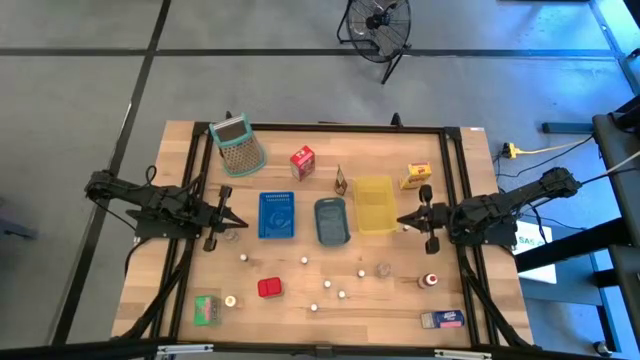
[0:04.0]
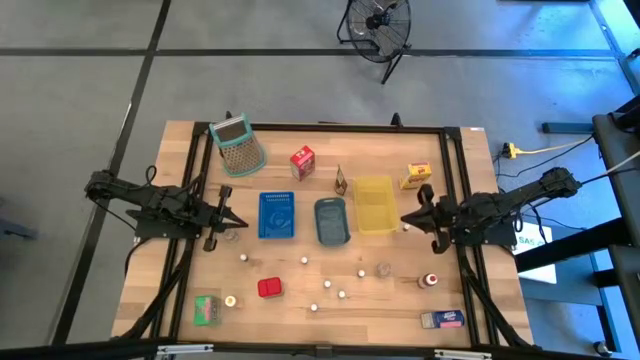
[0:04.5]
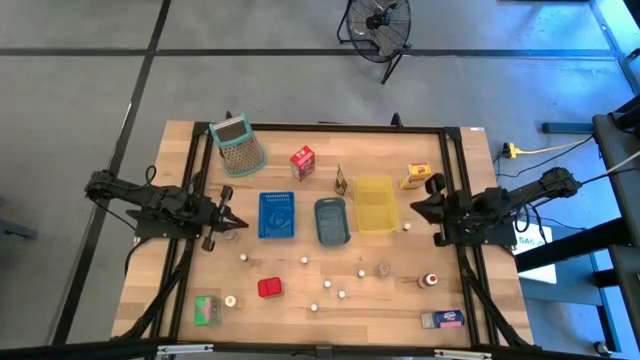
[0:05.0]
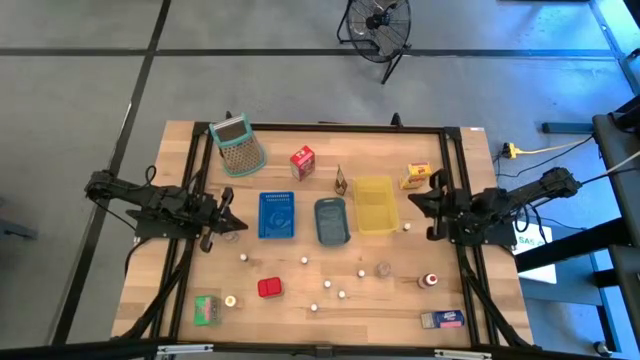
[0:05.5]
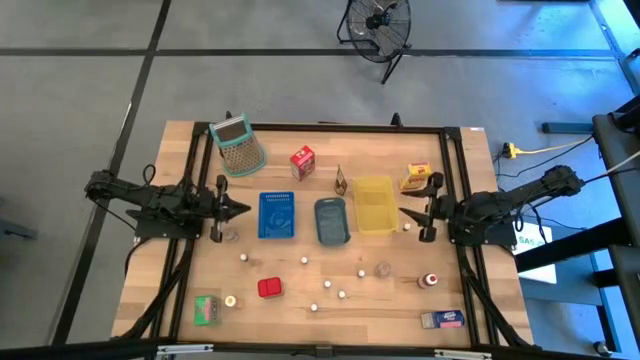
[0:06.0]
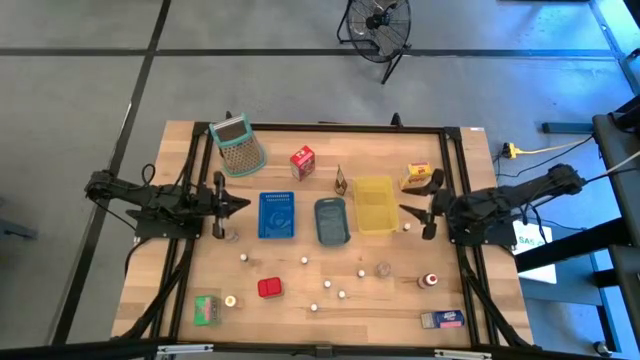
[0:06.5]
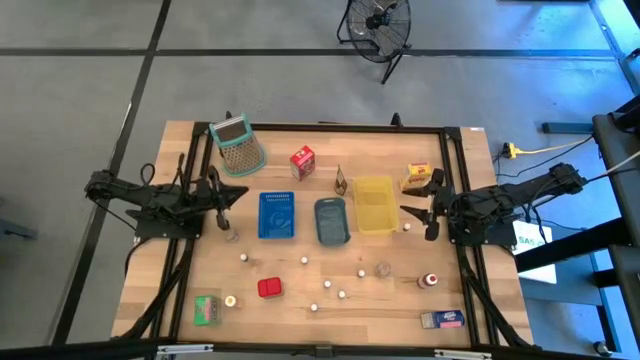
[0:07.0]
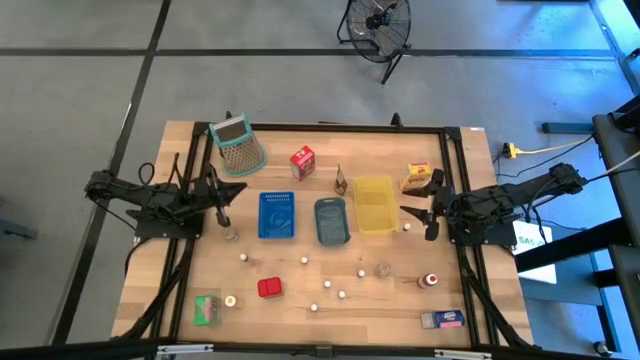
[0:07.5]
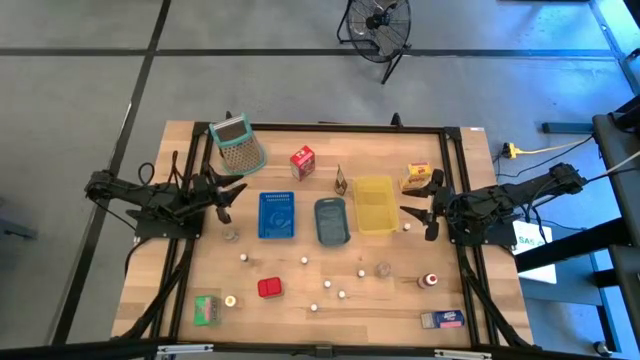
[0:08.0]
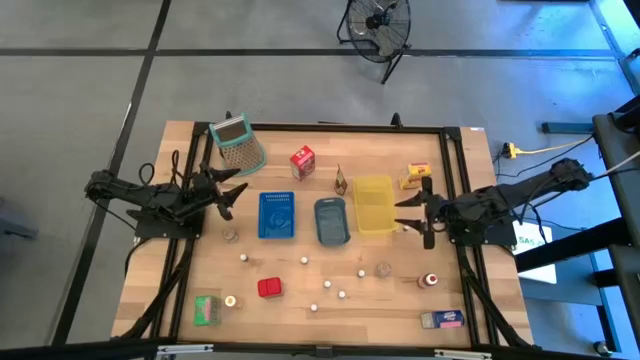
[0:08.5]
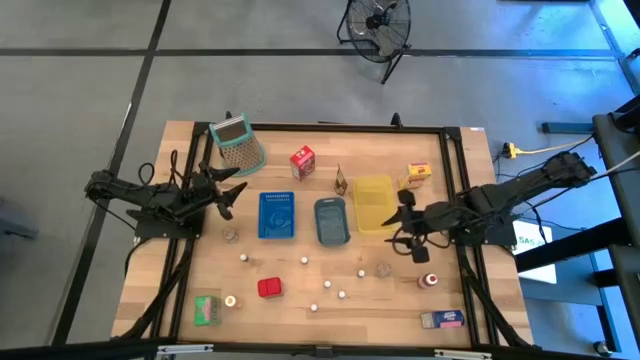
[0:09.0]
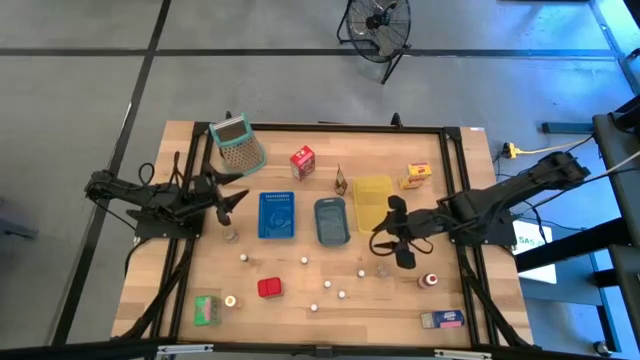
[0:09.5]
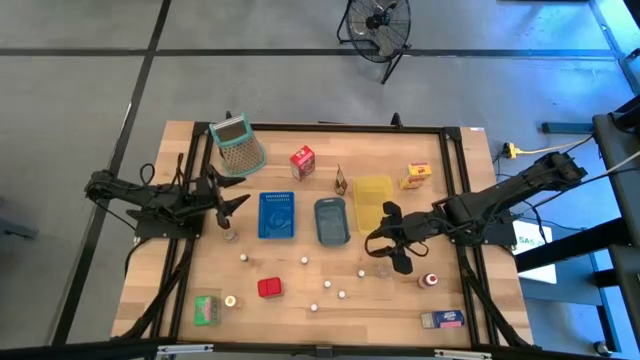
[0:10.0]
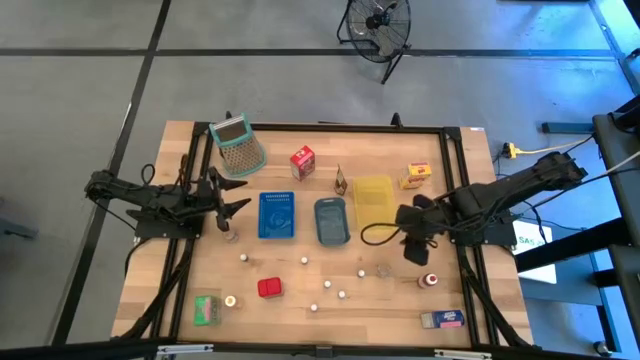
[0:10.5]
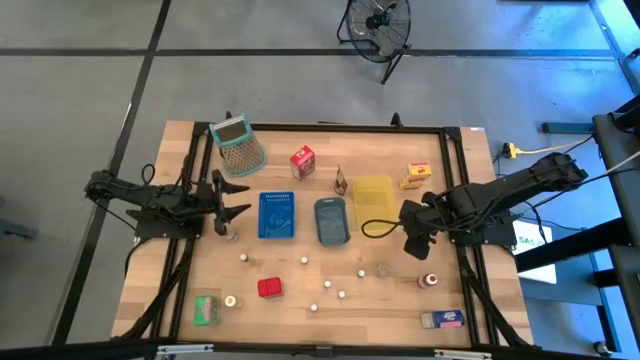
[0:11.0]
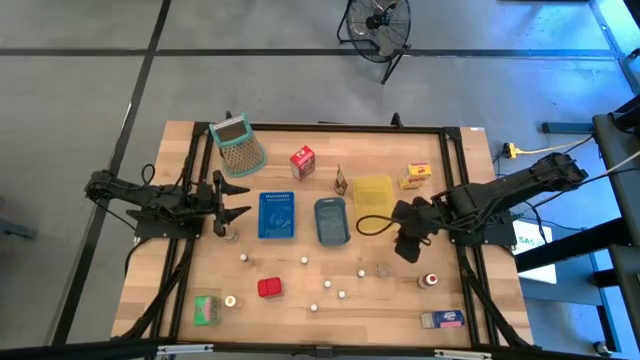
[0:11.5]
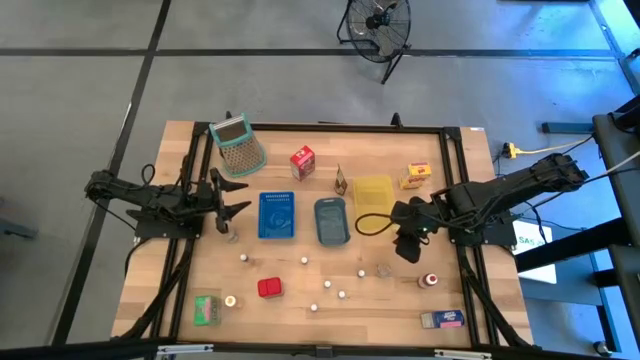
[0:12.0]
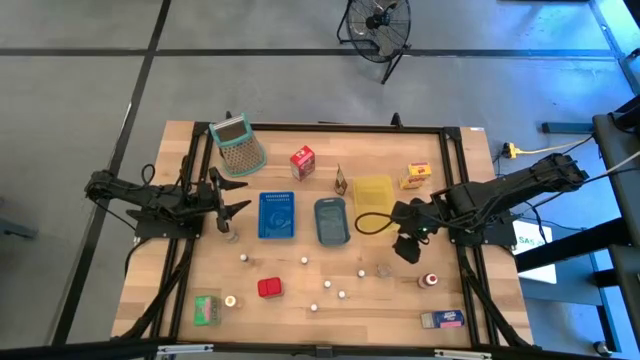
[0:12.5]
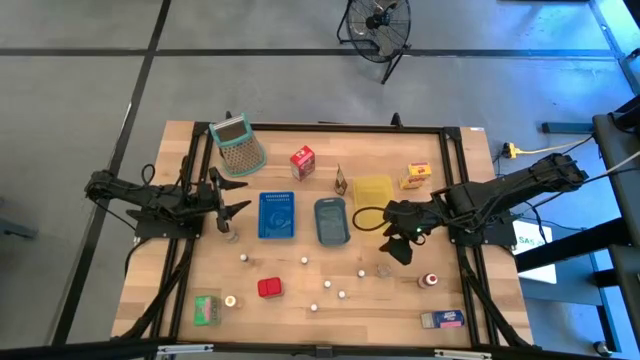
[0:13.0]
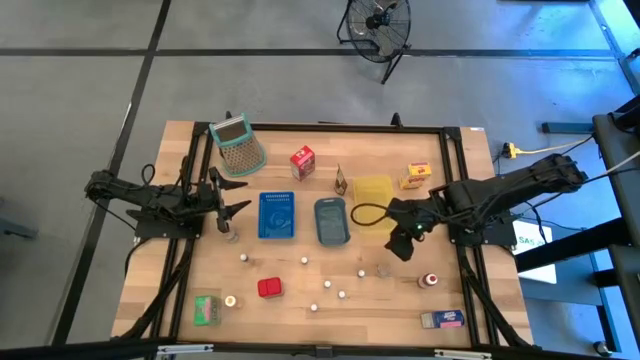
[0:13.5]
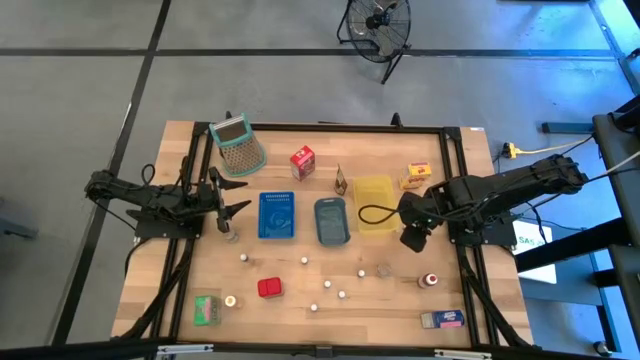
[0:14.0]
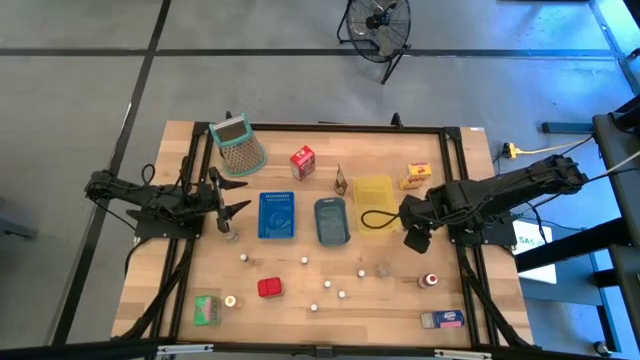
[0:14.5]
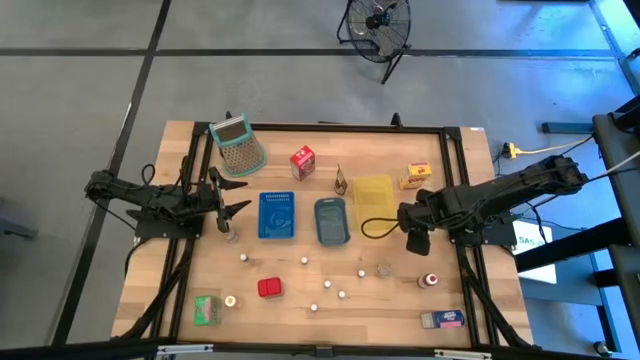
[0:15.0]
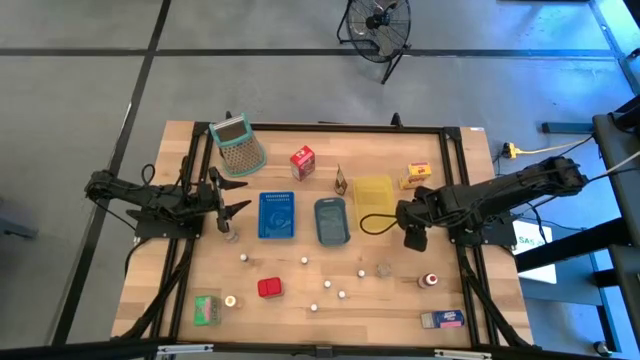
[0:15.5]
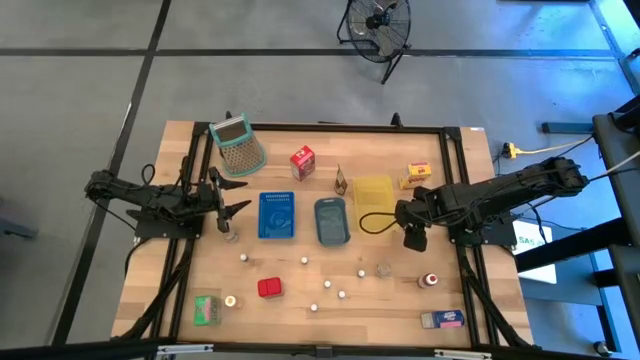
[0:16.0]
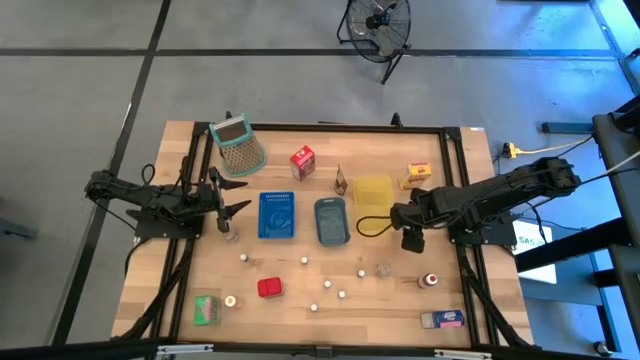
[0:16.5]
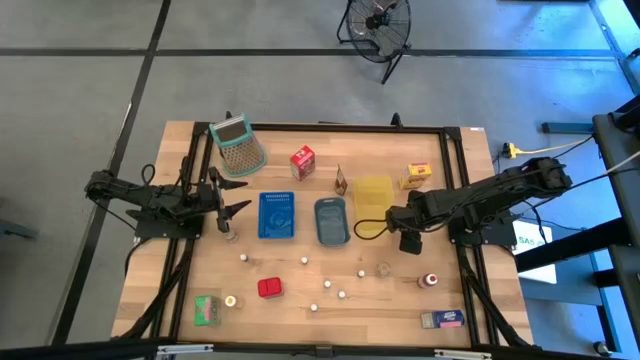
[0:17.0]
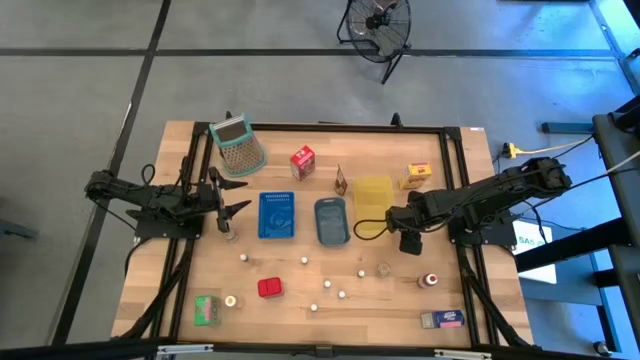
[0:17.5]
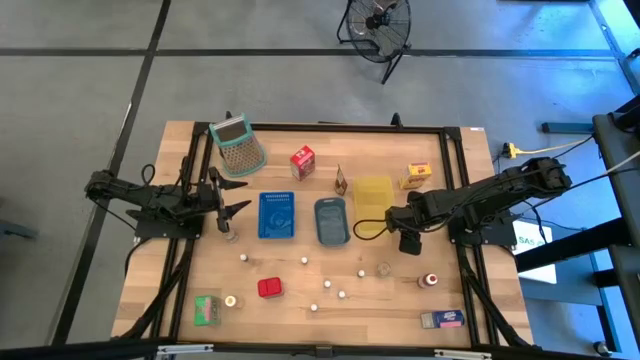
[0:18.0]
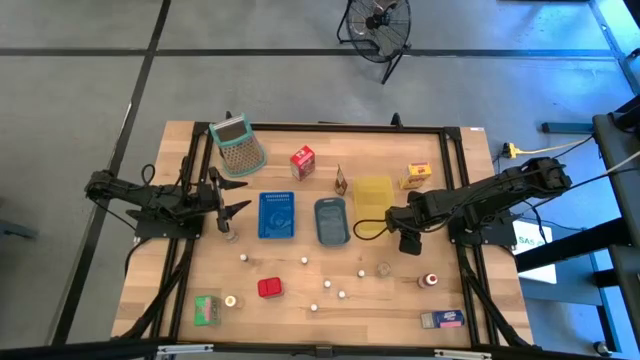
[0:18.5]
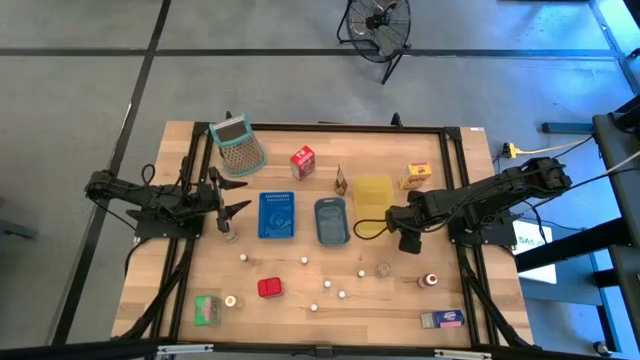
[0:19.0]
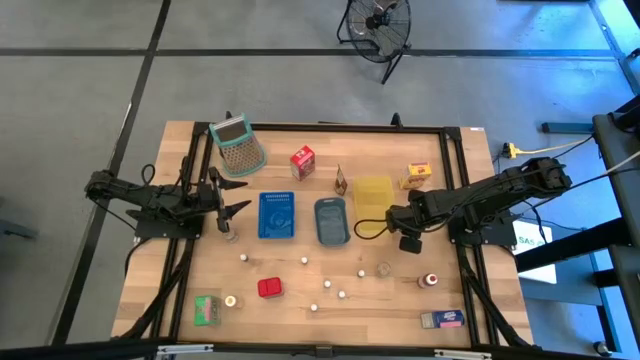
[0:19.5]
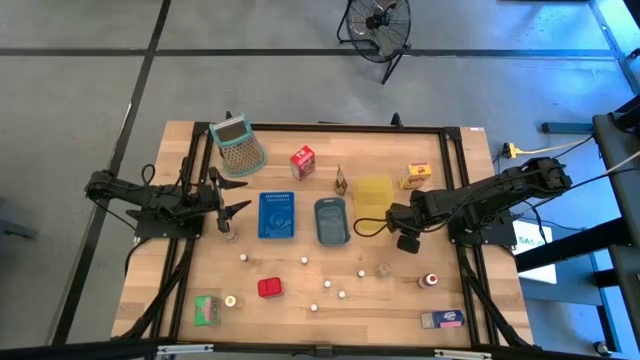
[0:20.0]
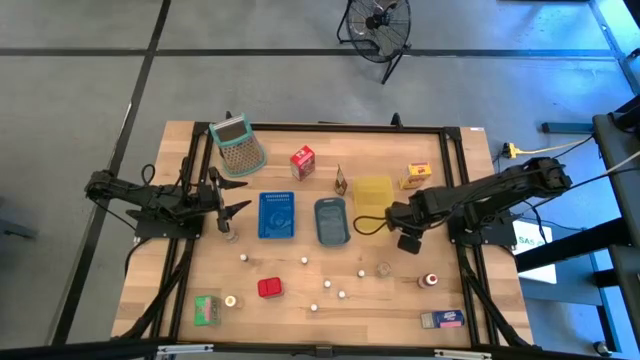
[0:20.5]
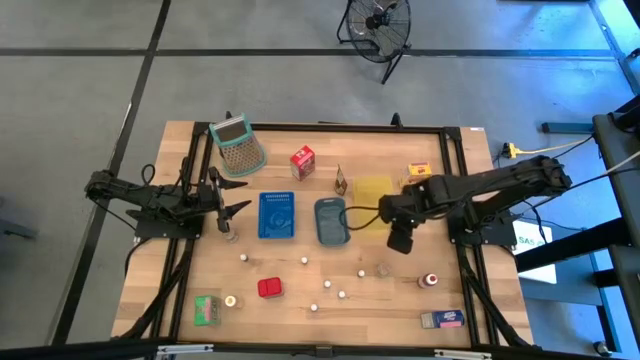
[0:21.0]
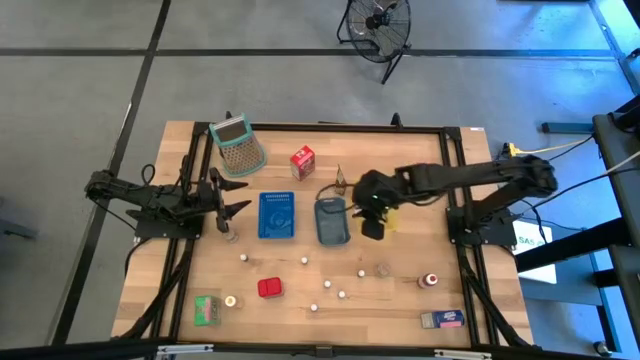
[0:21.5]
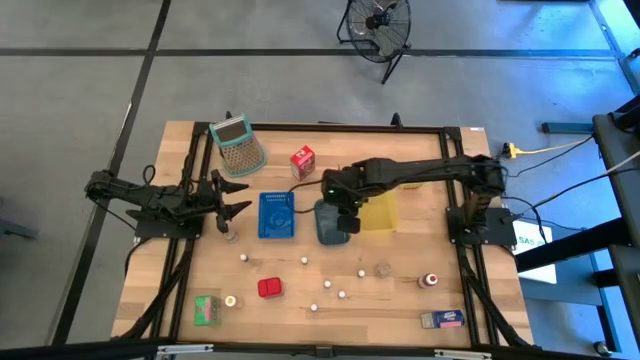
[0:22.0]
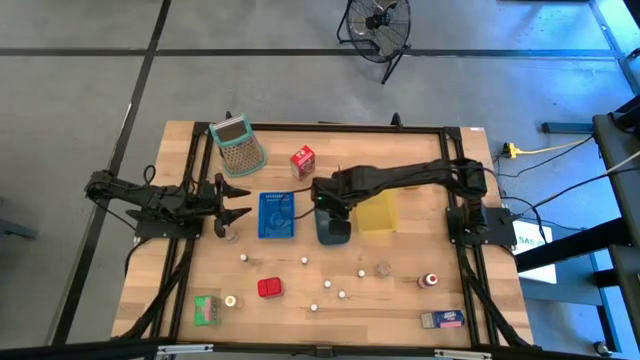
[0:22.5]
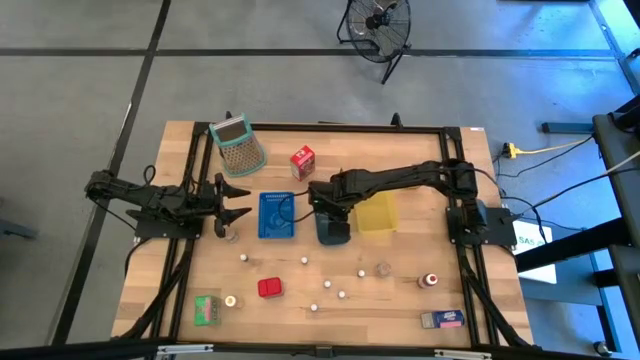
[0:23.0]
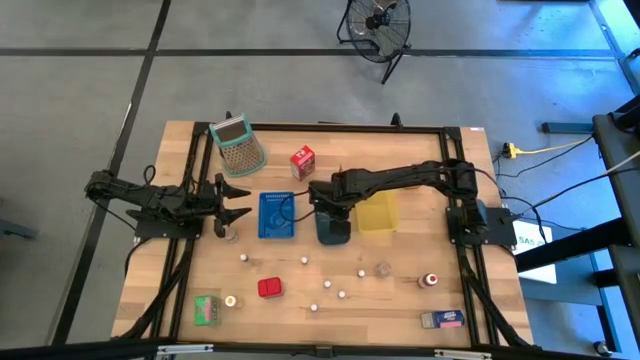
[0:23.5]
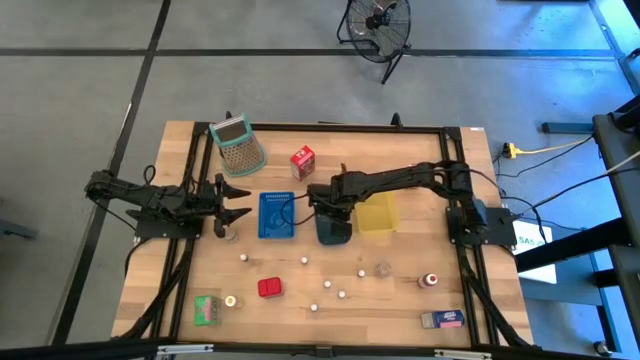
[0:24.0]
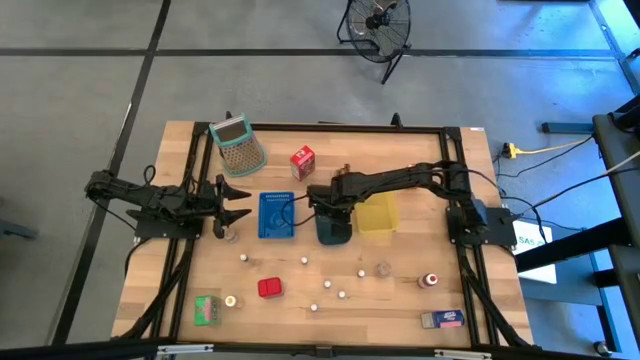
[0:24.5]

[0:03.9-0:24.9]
Task: Pick & Place Kitchen Items
Put the small food coloring bottle into the gray bin
